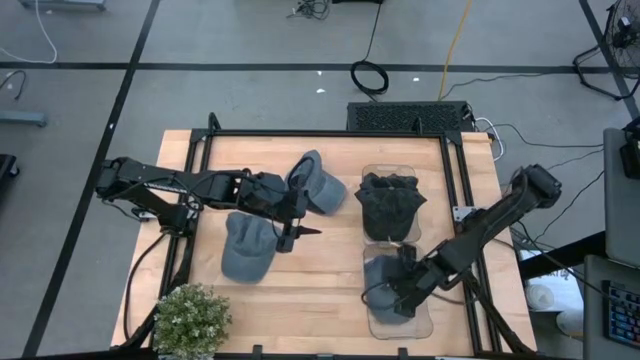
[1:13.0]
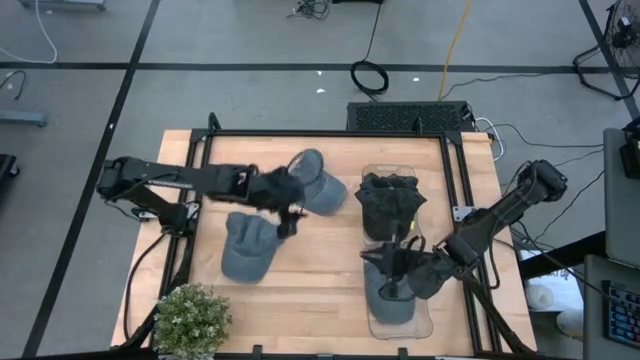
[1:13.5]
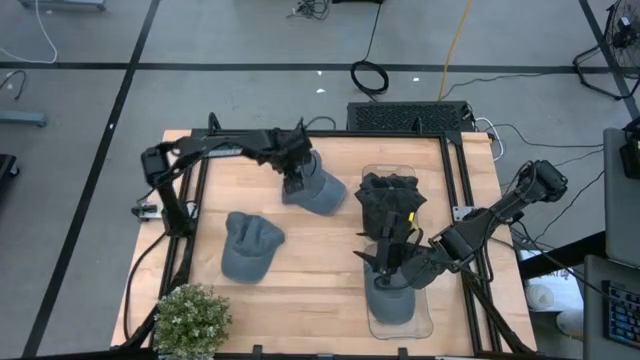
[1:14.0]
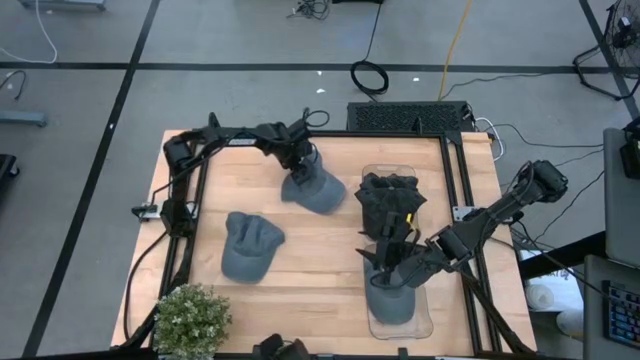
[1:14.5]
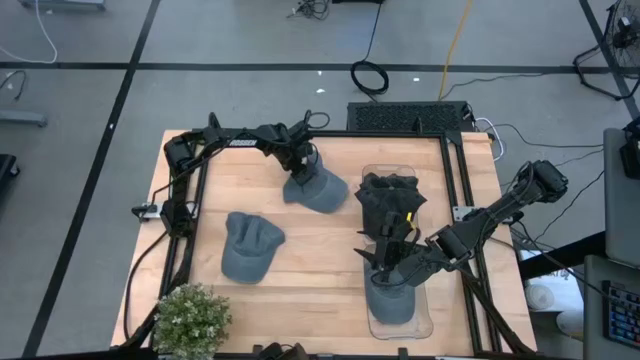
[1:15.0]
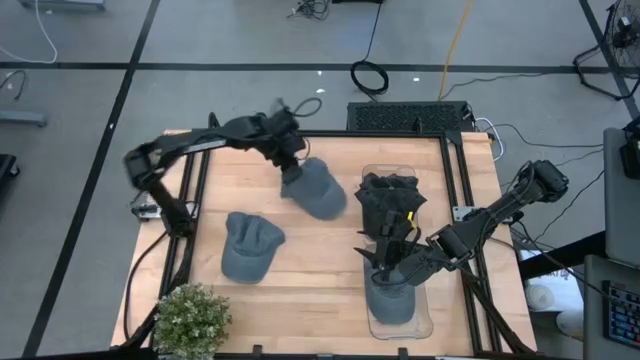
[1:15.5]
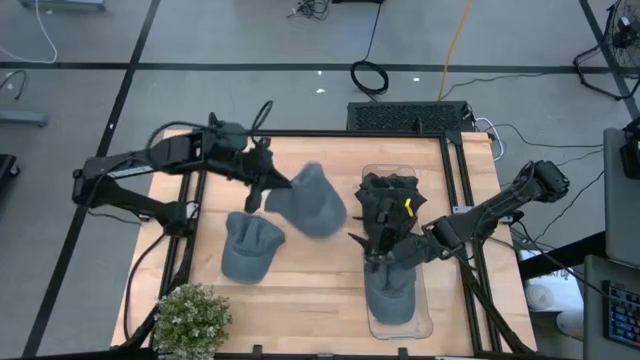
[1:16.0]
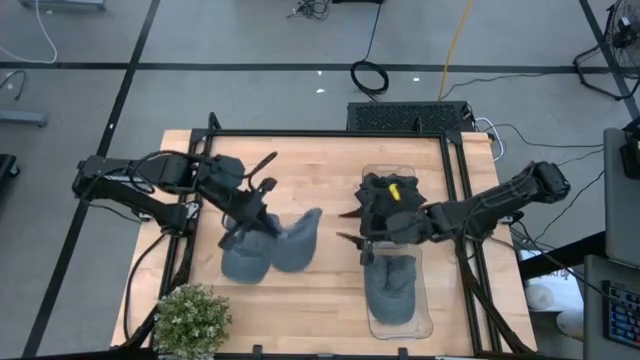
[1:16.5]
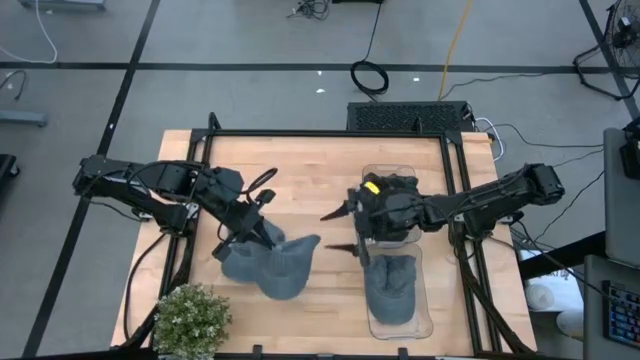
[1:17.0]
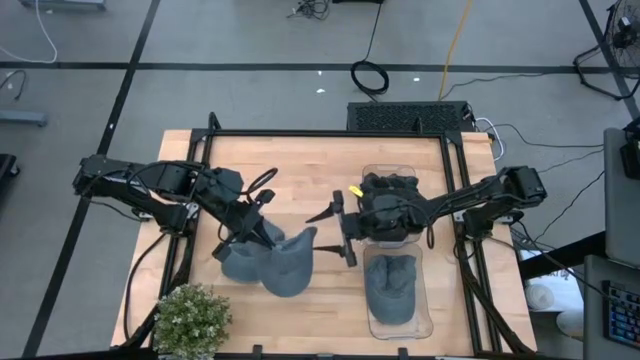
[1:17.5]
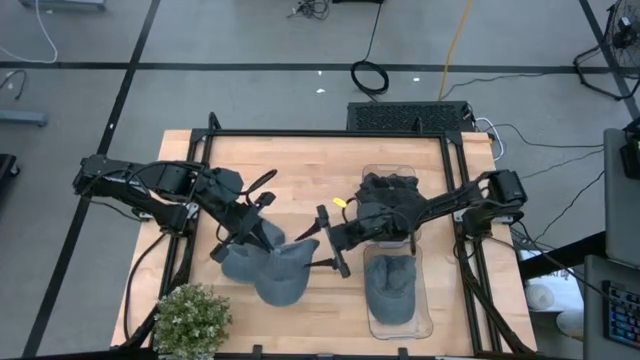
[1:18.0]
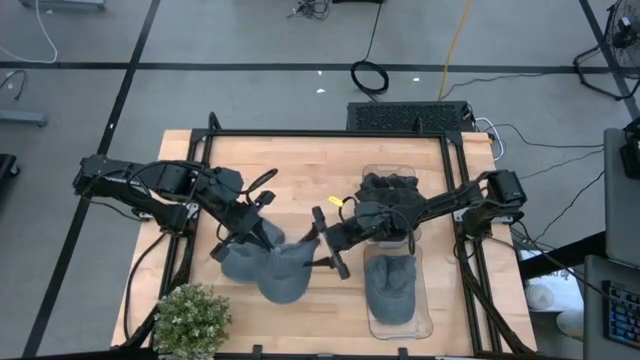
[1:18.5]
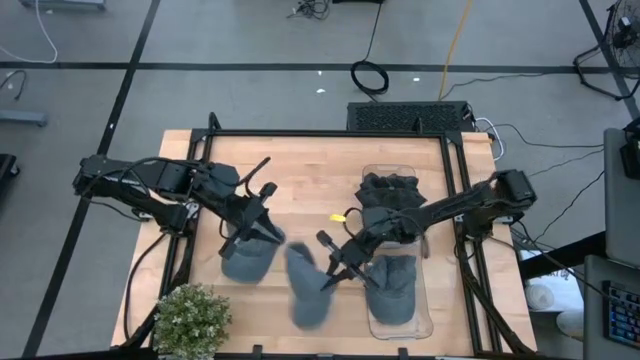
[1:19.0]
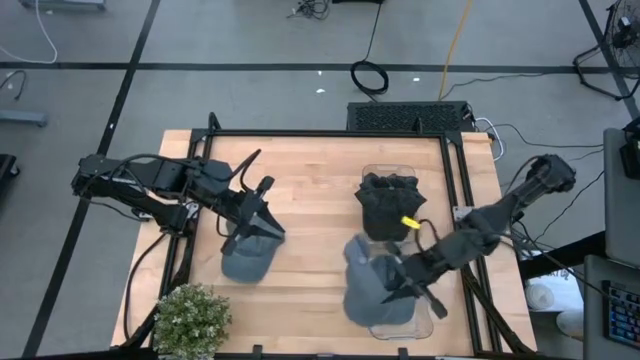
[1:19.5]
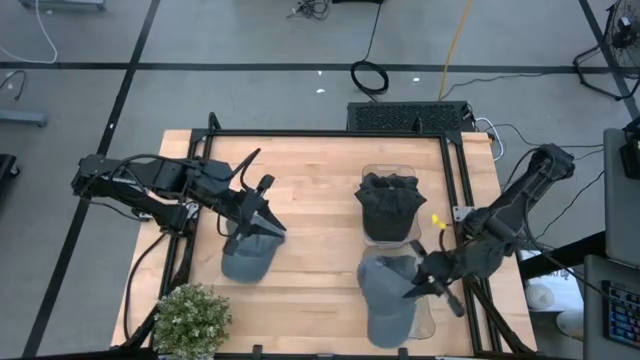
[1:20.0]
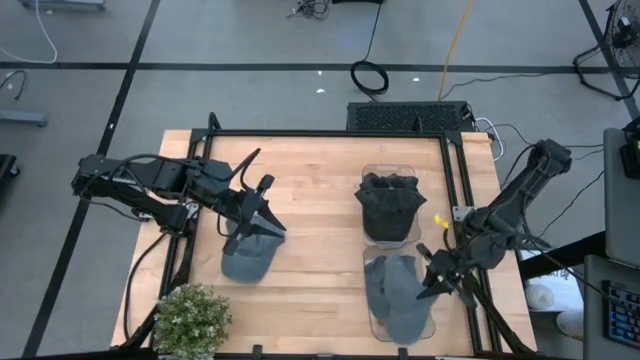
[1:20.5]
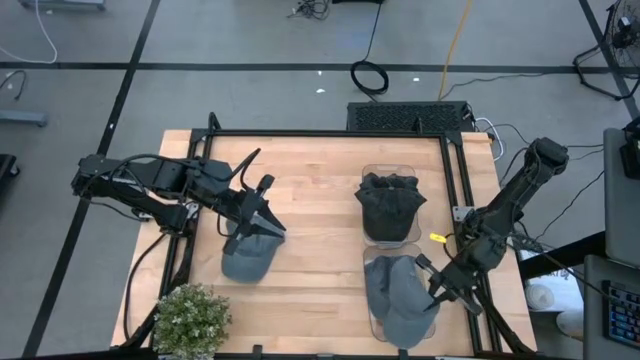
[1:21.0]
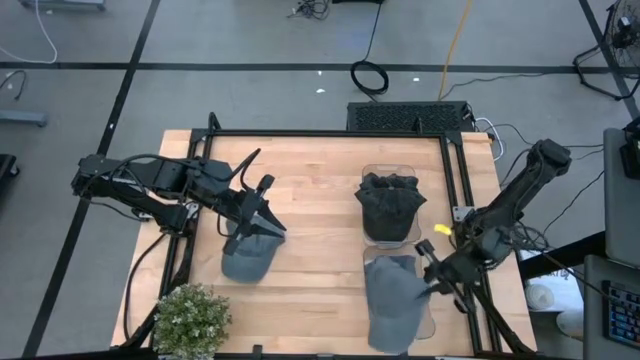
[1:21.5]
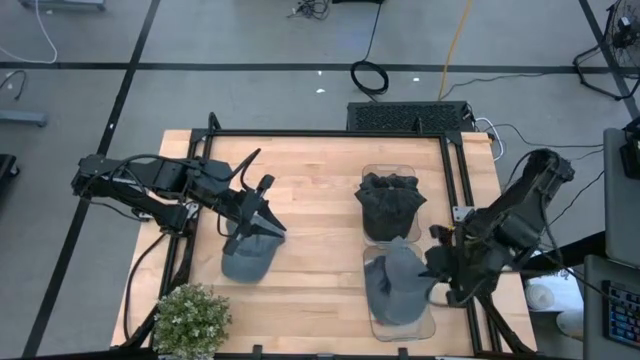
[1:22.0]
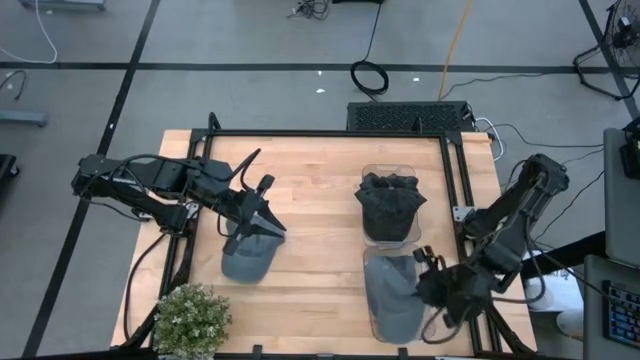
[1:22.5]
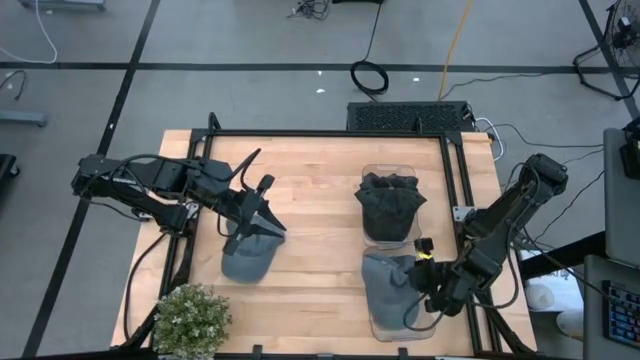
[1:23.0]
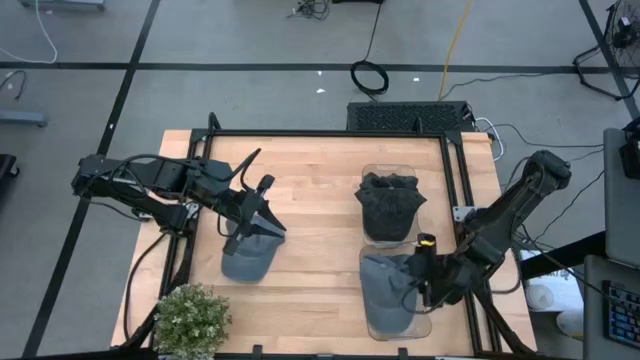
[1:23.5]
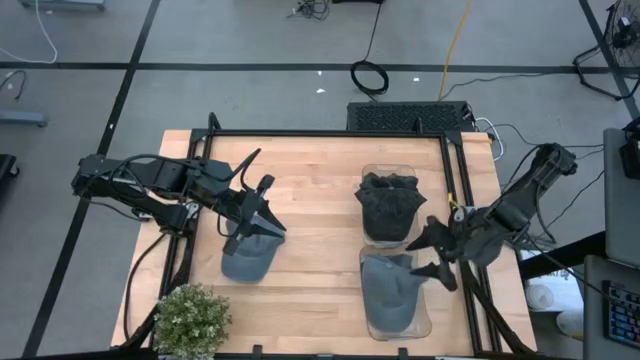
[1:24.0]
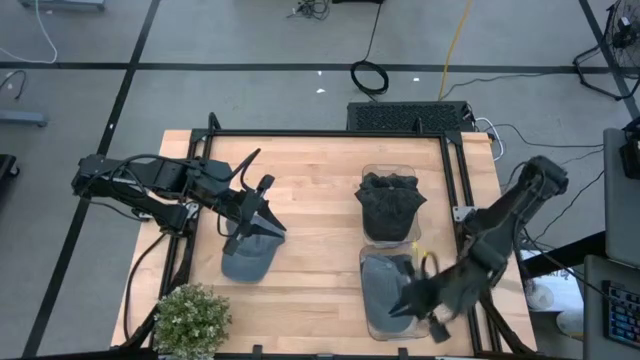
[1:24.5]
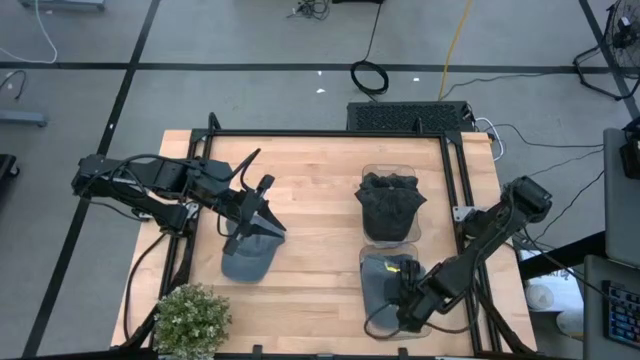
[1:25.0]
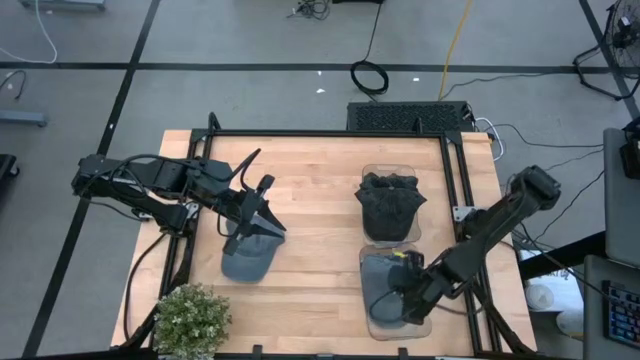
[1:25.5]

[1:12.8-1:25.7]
Task: Pick & Place hat
Put the top blue cap into the bottom transparent bin

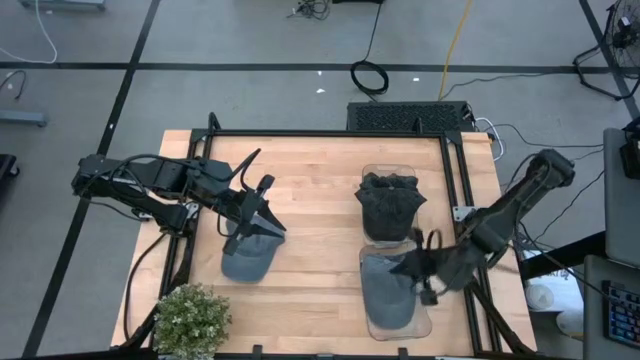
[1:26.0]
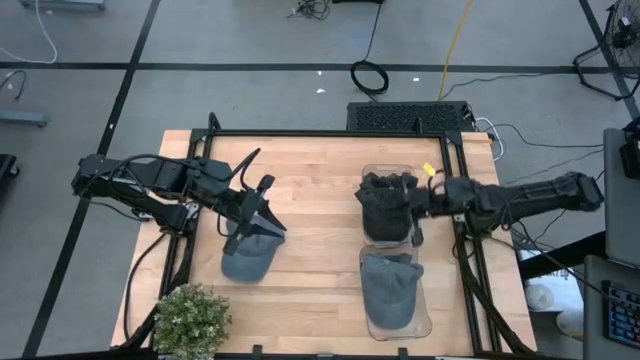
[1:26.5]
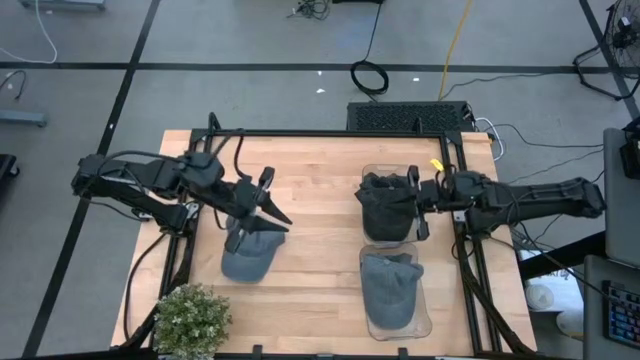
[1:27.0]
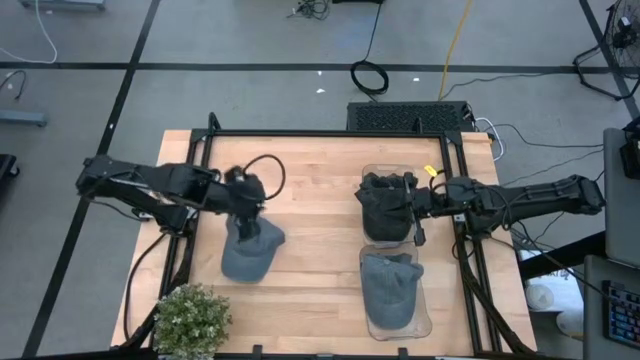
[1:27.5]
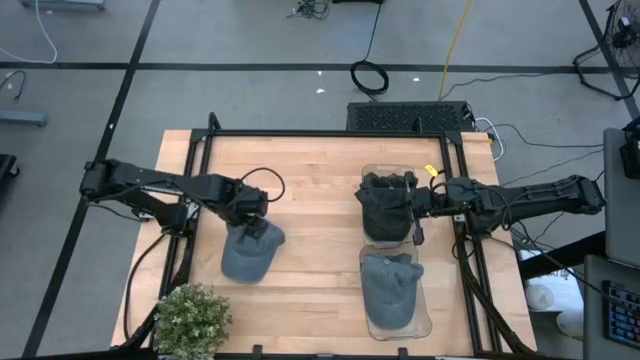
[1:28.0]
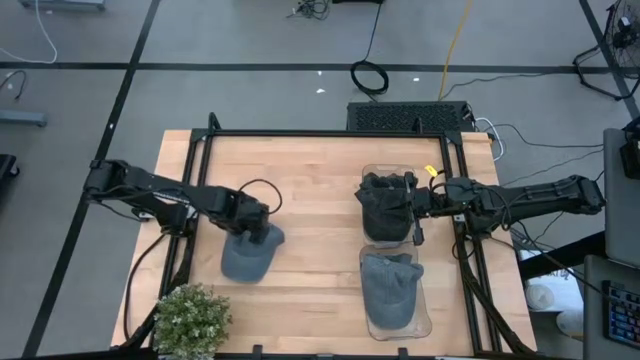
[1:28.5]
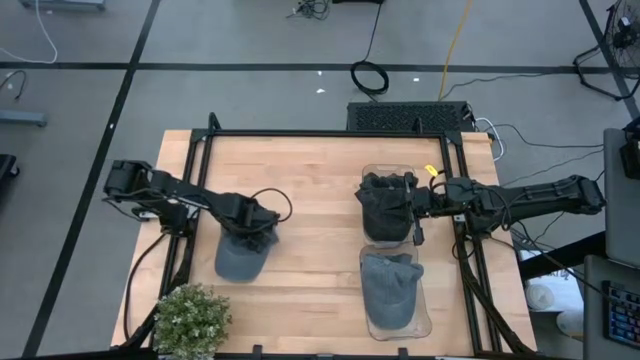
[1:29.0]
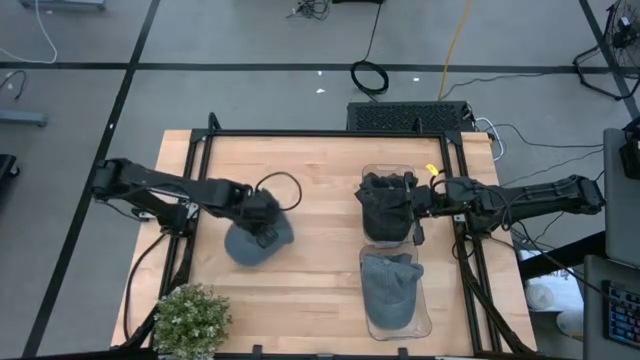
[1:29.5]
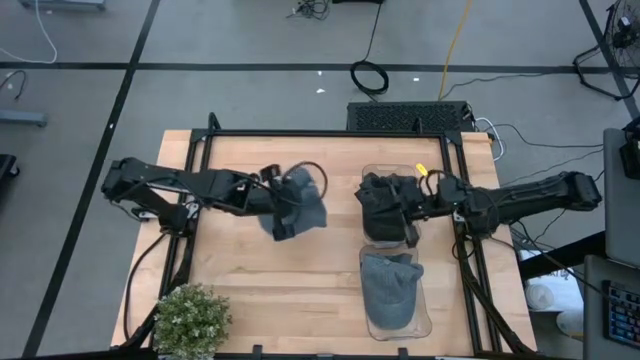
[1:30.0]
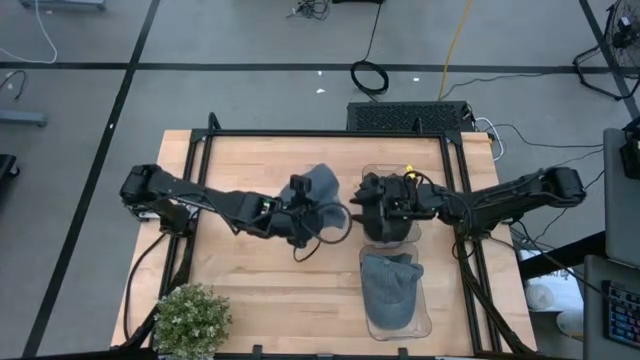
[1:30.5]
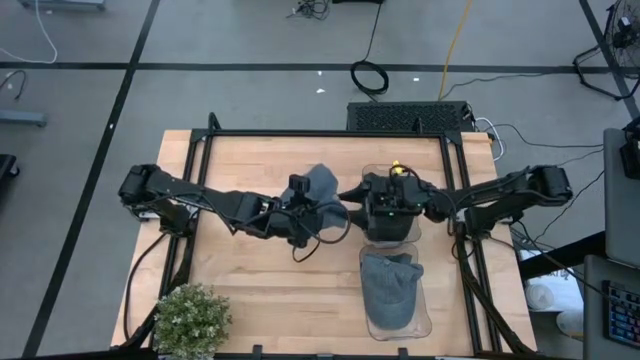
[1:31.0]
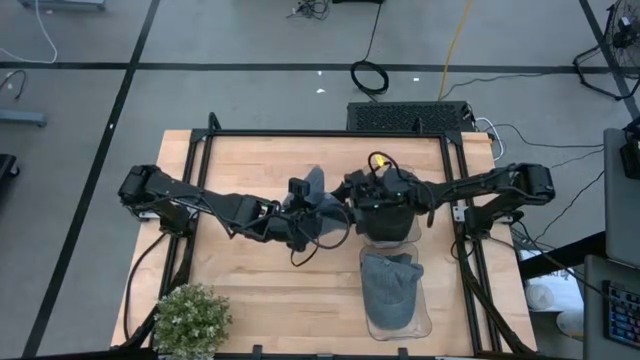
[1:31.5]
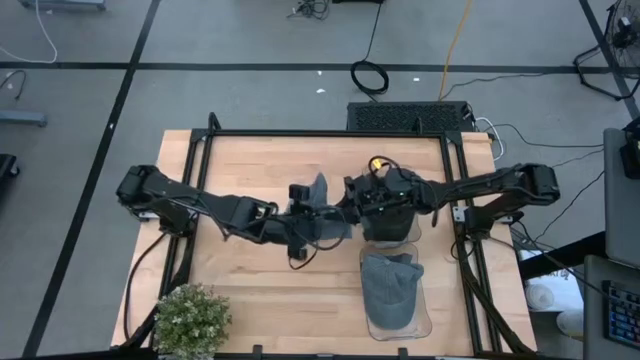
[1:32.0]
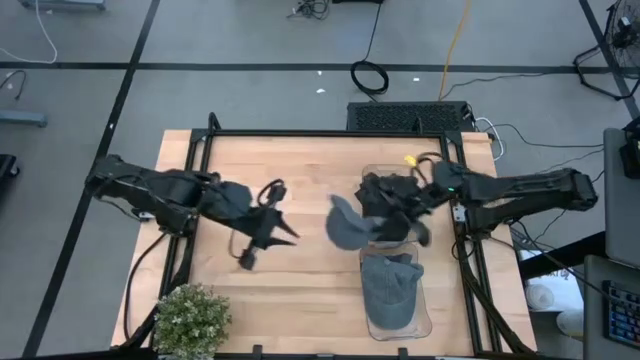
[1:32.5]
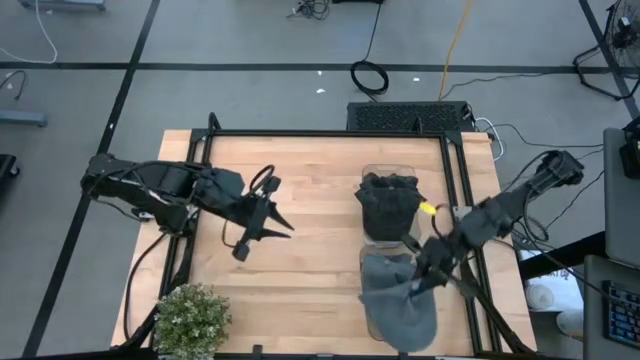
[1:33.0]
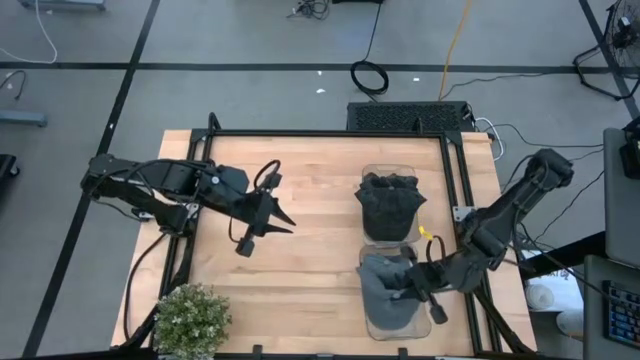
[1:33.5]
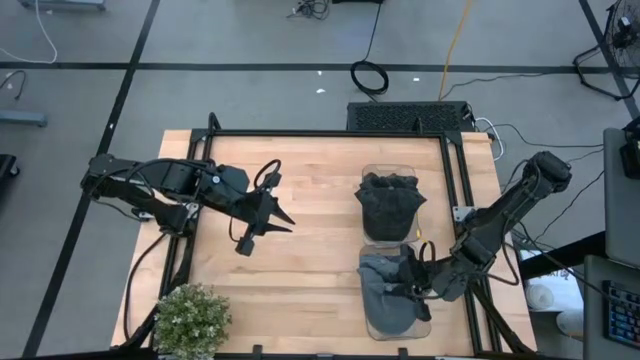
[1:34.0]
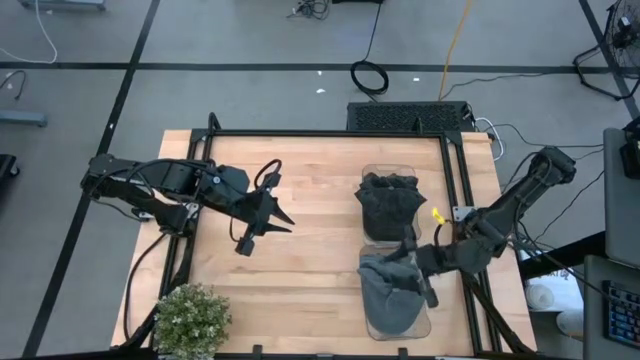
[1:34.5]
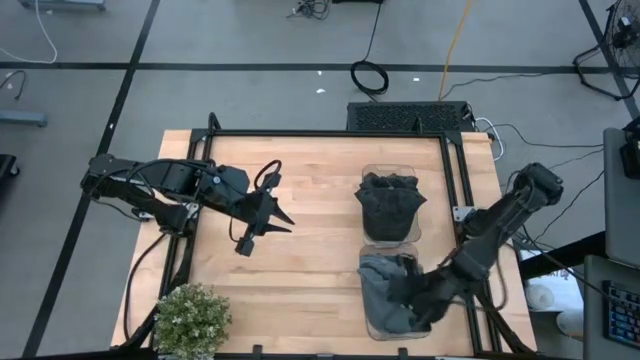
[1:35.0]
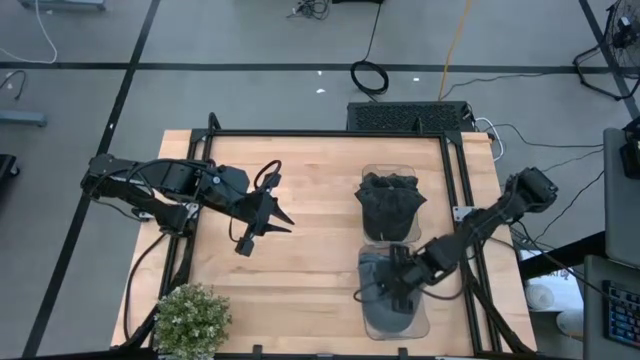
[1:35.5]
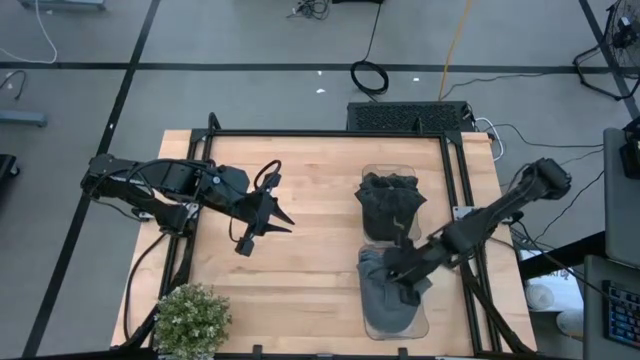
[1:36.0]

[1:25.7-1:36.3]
Put the blue cap into the bottom transparent bin
